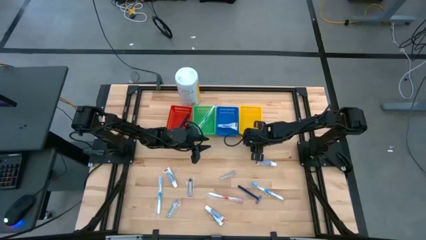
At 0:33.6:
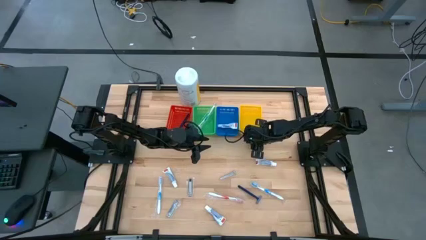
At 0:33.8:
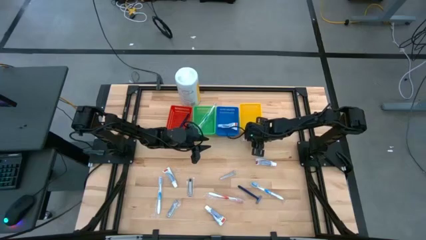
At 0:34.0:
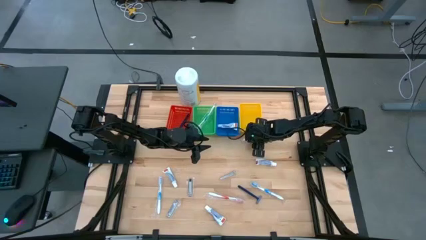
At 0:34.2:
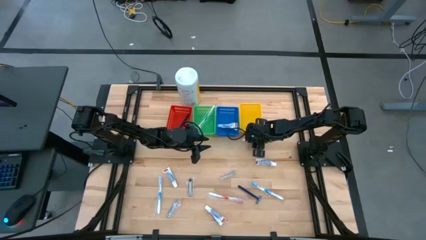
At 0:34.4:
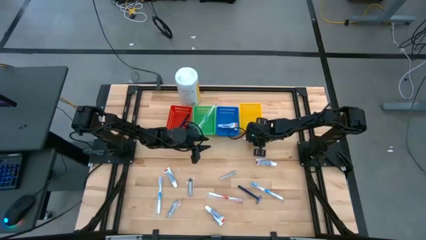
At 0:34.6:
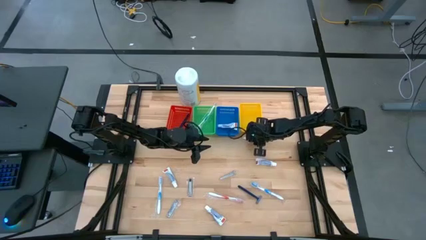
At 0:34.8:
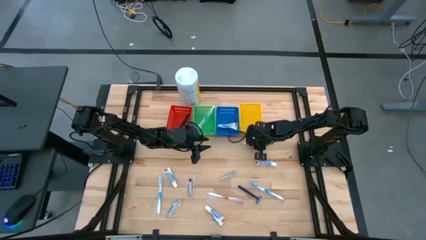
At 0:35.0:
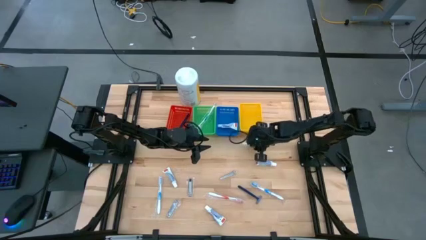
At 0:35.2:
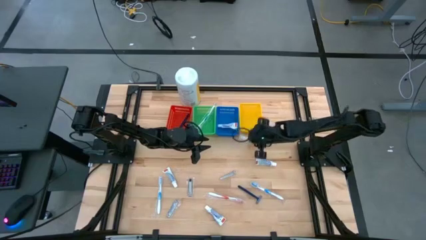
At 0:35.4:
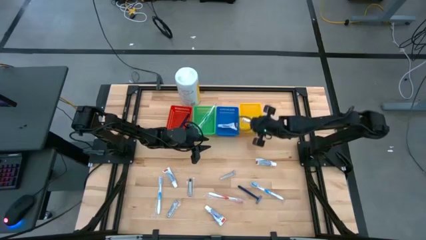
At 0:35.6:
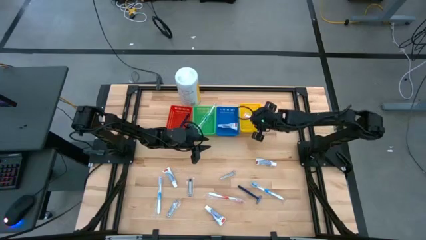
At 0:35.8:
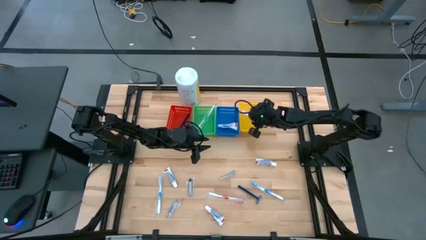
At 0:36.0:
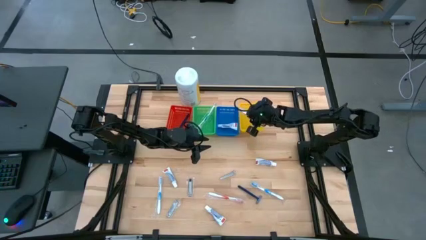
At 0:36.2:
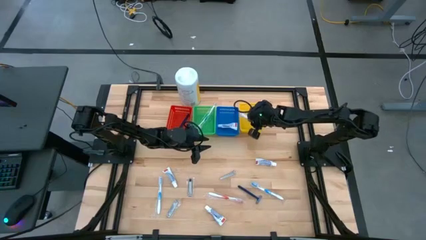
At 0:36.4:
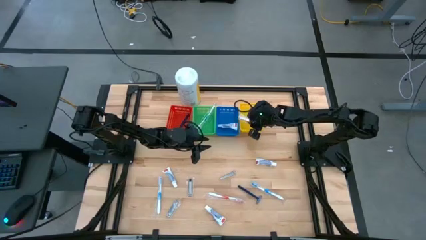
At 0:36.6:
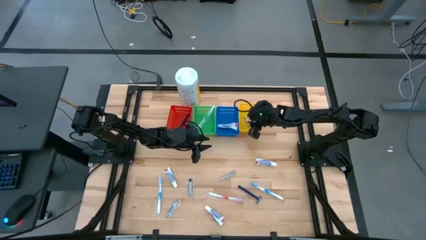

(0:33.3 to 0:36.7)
Task: Pick & Place Travel size toiletries
Put the silver nail cutter into the yellow bin

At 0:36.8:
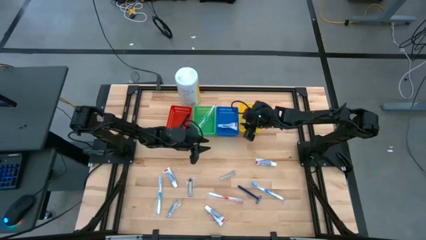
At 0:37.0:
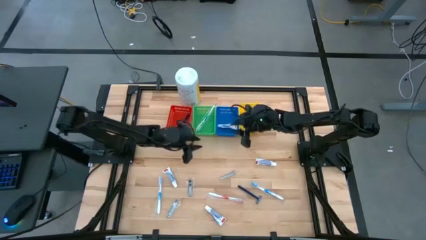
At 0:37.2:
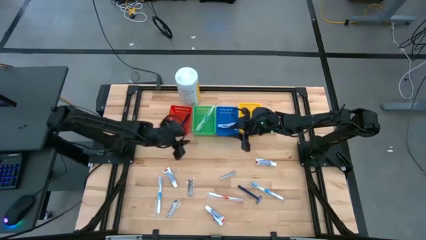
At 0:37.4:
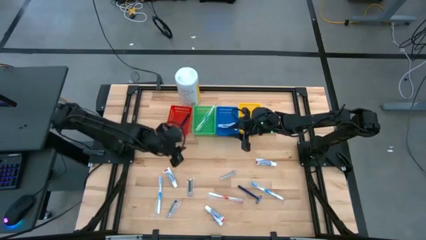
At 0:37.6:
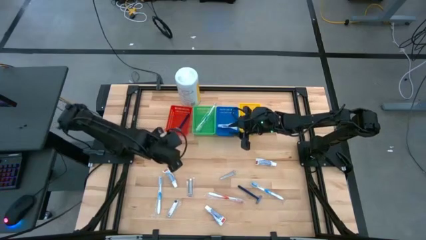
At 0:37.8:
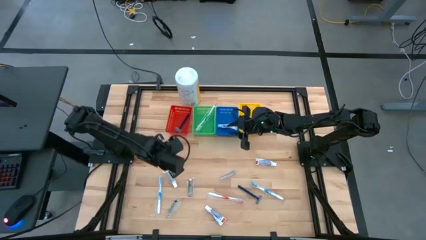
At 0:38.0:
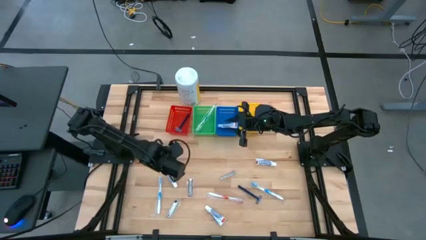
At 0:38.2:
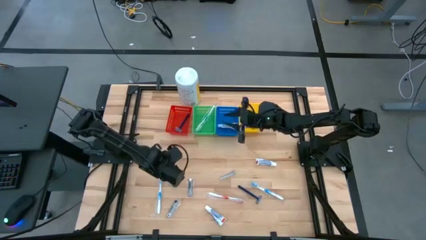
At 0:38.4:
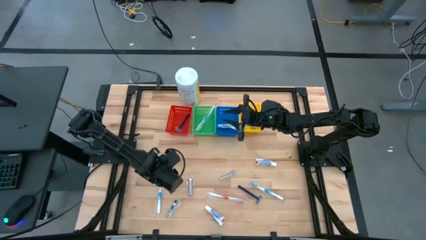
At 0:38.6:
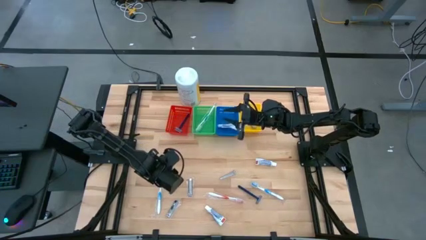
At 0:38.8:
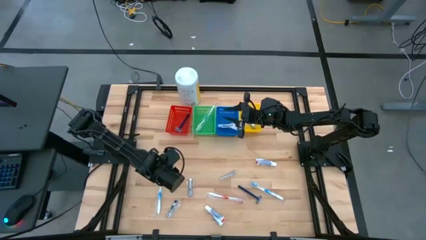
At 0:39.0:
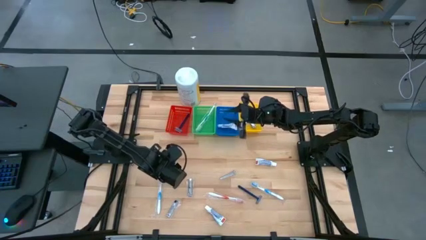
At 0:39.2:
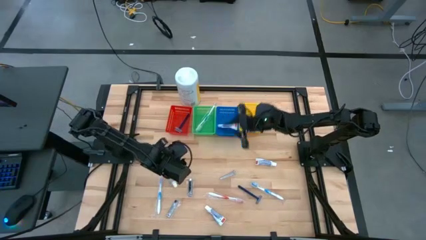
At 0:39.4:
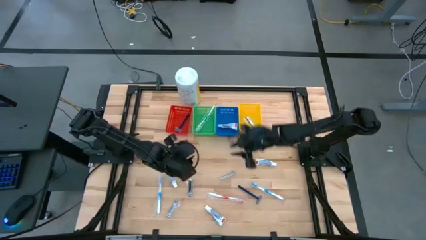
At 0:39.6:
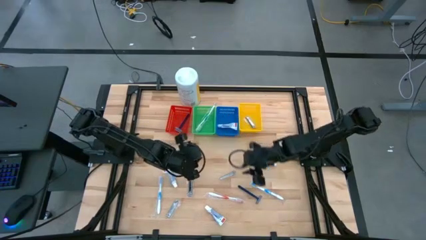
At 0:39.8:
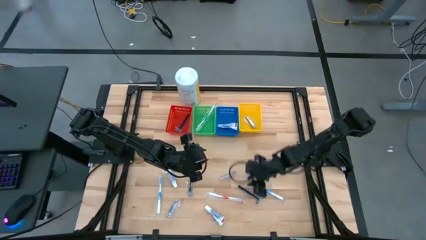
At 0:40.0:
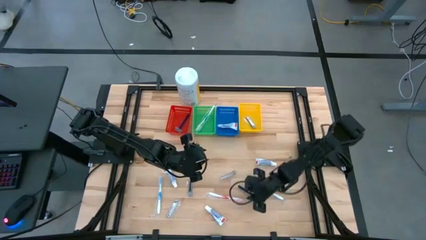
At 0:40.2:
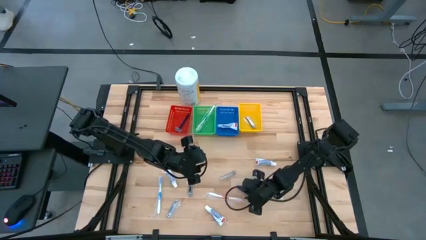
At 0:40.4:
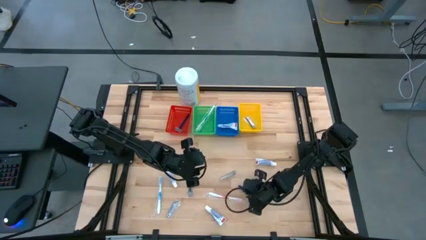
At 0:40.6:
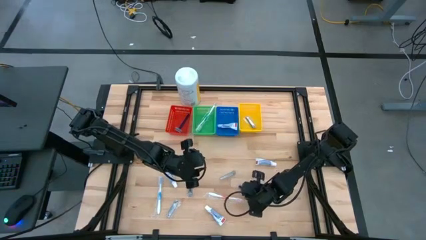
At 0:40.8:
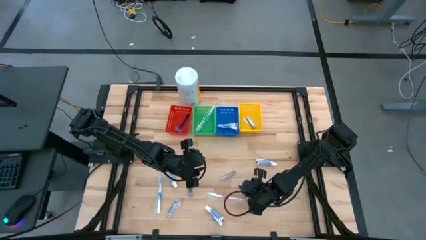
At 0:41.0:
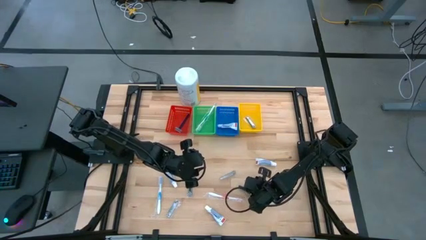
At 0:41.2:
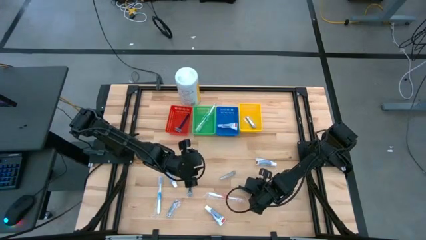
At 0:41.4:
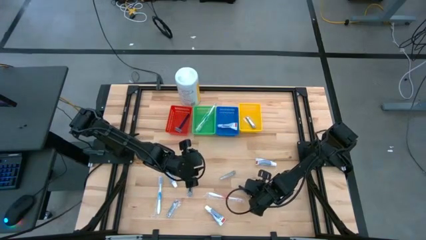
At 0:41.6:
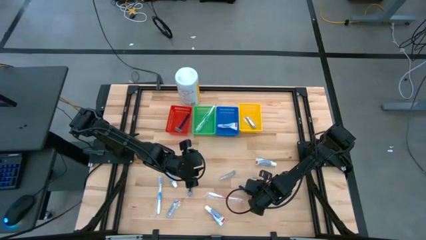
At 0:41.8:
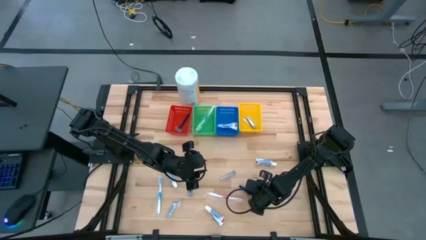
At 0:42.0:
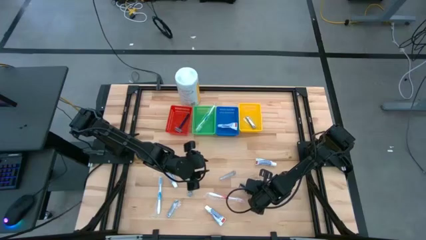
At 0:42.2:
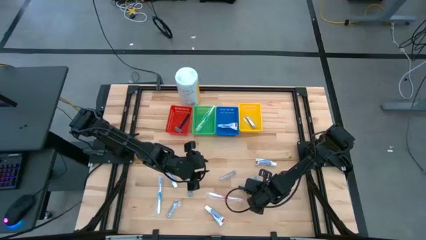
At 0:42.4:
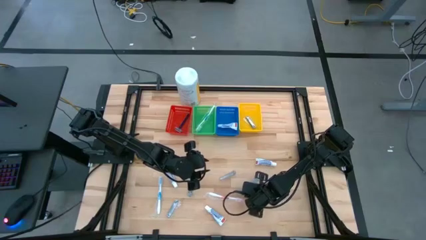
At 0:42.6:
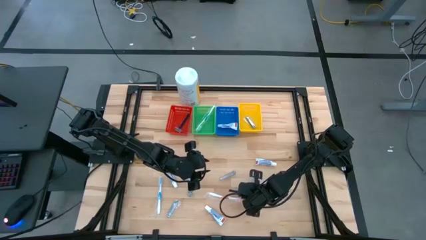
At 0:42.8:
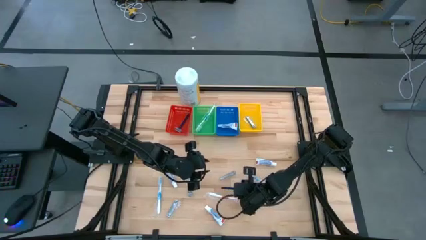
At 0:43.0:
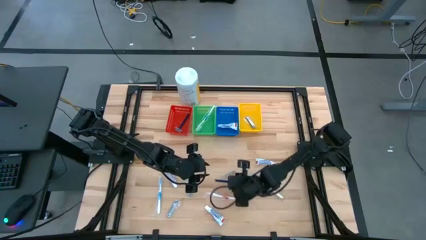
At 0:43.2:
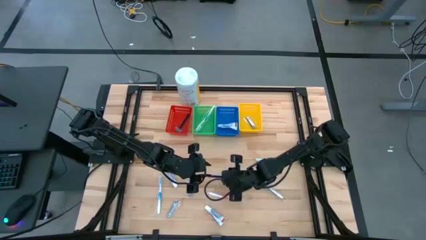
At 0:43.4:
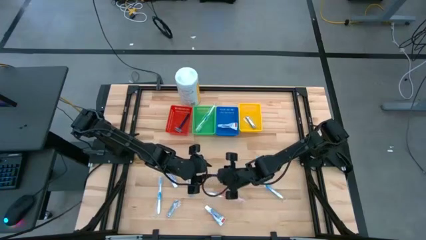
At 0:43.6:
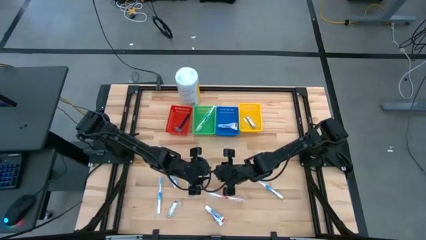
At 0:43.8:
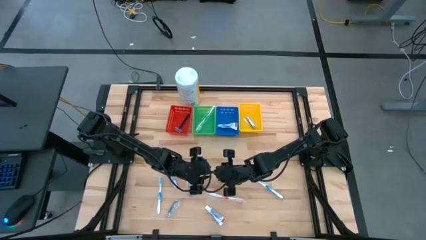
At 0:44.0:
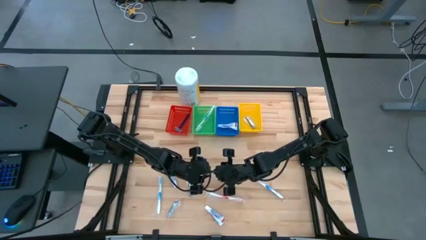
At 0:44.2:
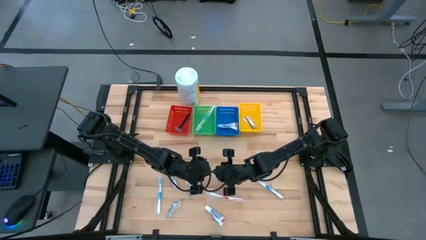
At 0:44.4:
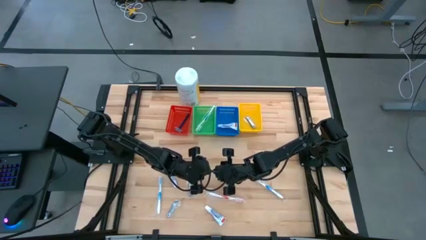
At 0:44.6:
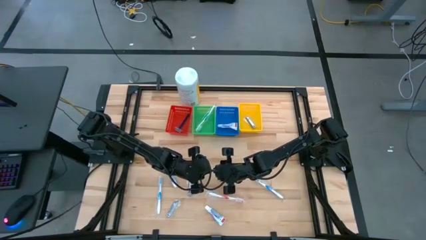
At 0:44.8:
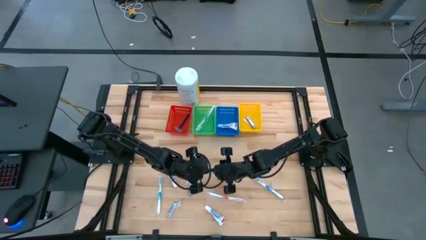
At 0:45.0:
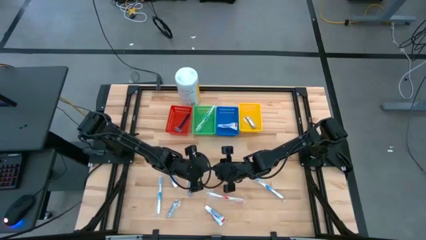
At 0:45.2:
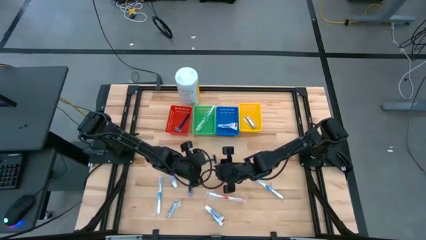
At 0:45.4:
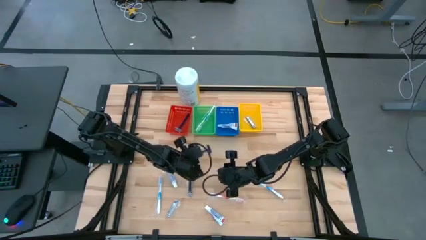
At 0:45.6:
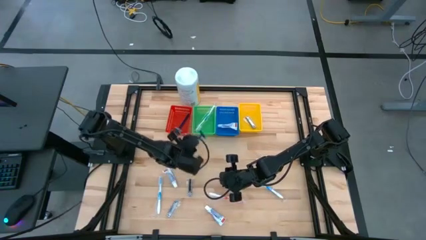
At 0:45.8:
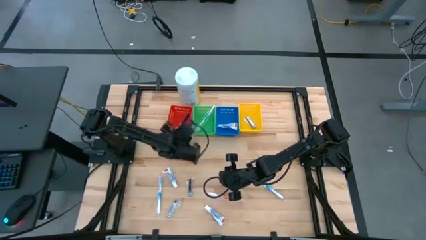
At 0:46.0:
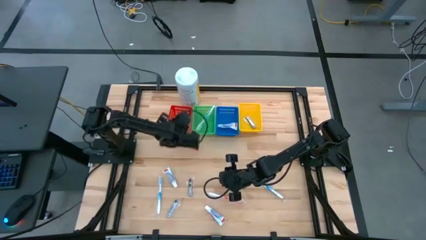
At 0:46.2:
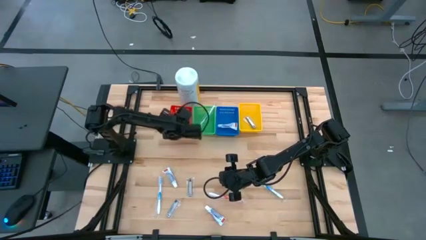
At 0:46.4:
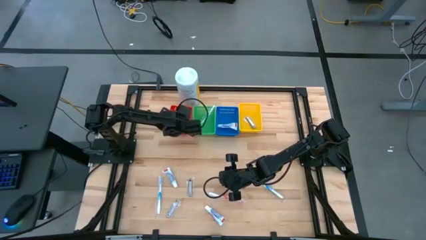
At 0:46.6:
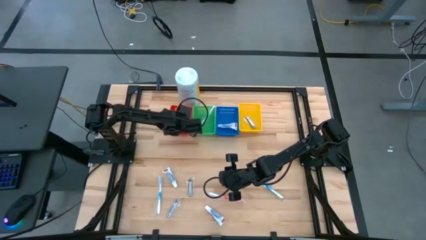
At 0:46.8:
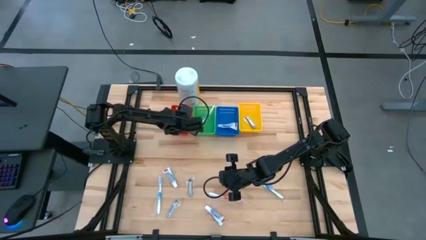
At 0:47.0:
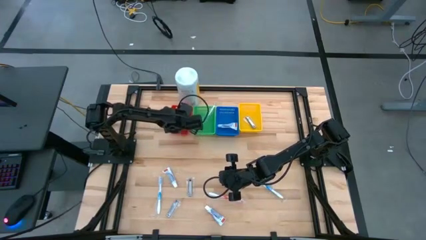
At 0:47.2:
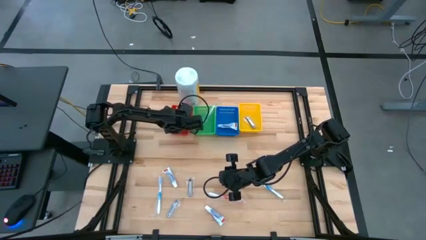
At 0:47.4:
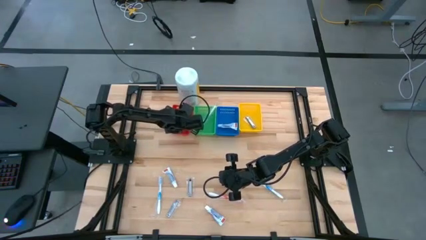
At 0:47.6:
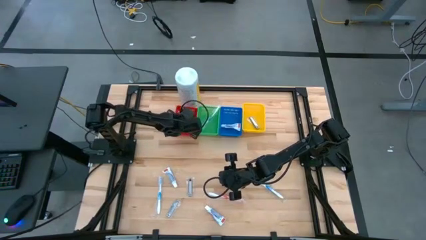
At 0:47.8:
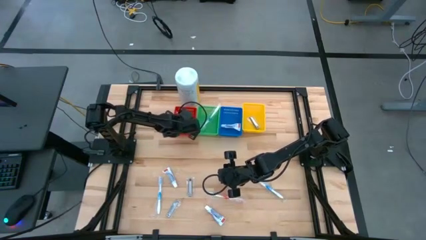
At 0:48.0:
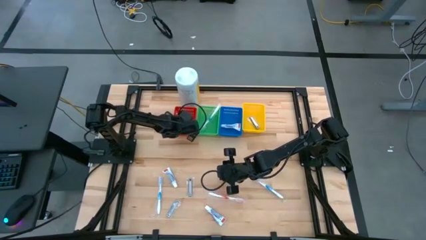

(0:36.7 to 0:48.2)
Put the blue razor into the orange bin
